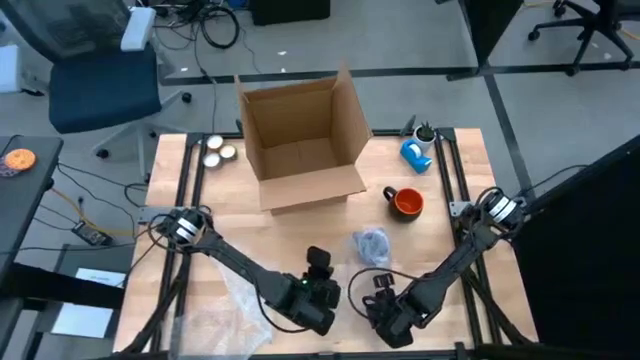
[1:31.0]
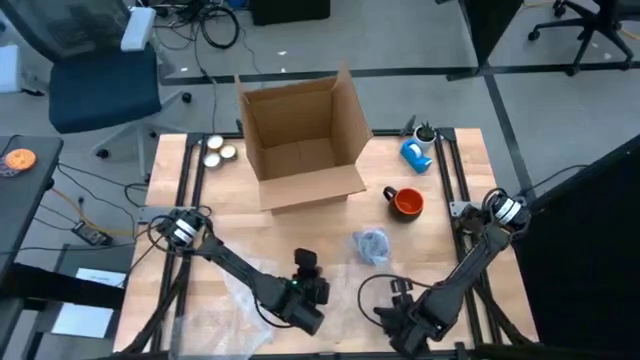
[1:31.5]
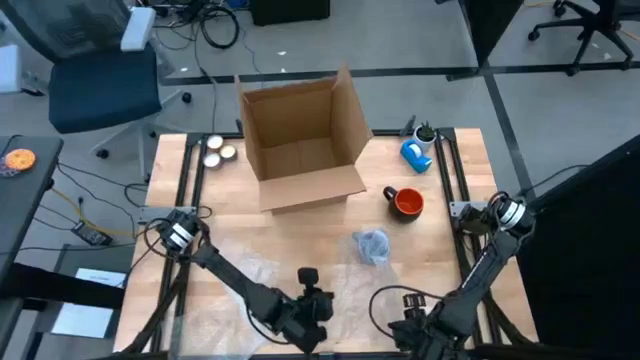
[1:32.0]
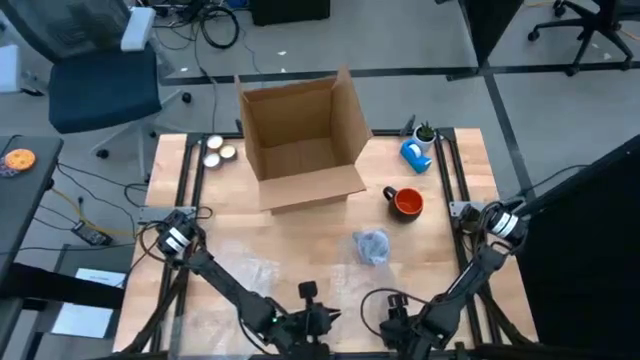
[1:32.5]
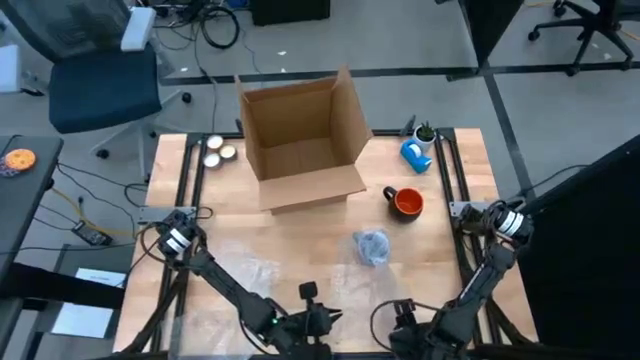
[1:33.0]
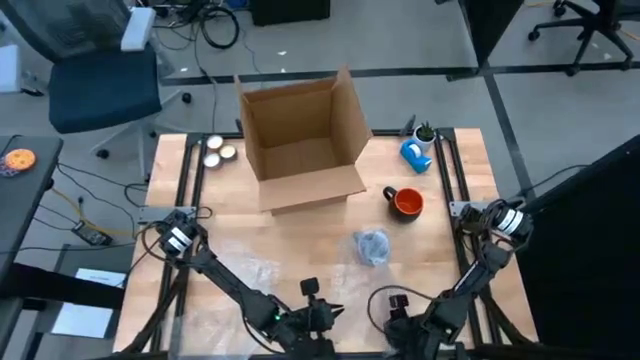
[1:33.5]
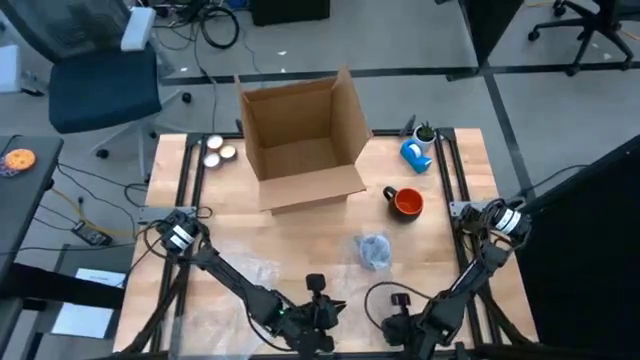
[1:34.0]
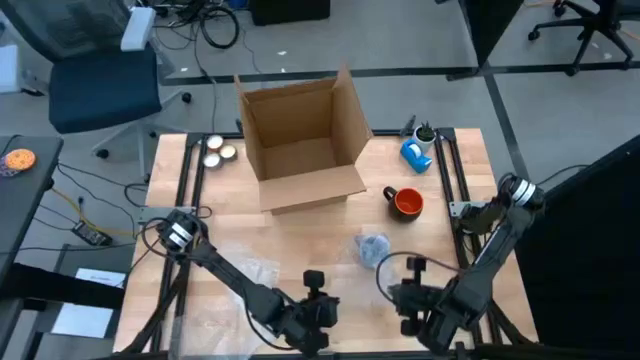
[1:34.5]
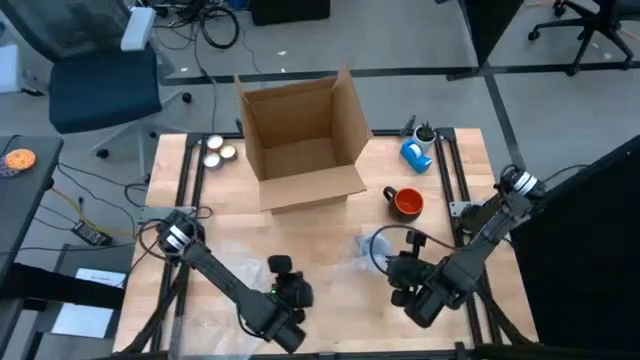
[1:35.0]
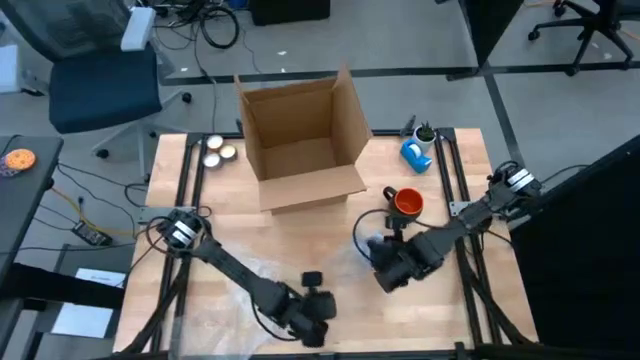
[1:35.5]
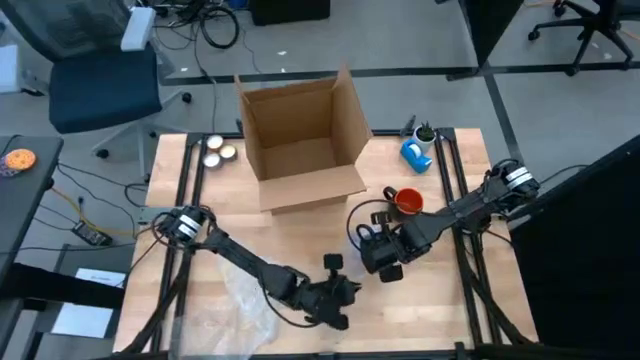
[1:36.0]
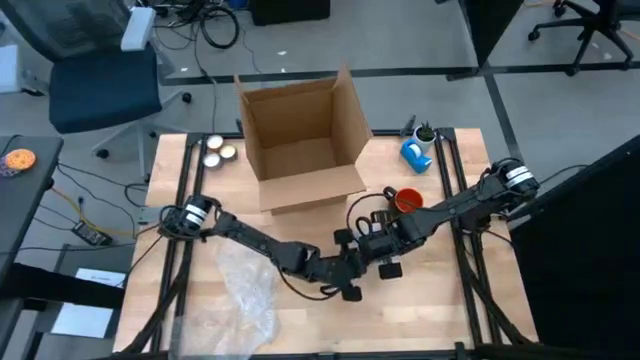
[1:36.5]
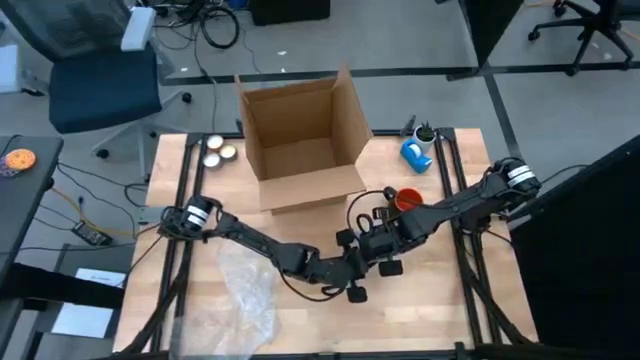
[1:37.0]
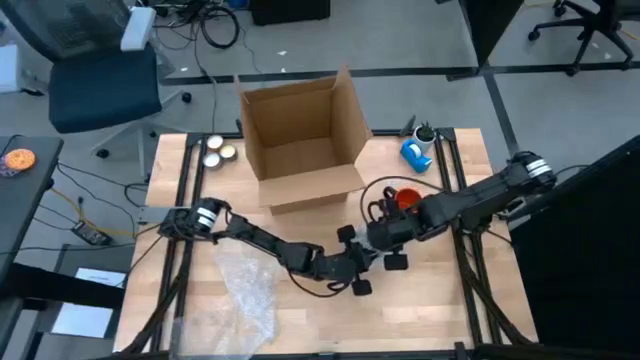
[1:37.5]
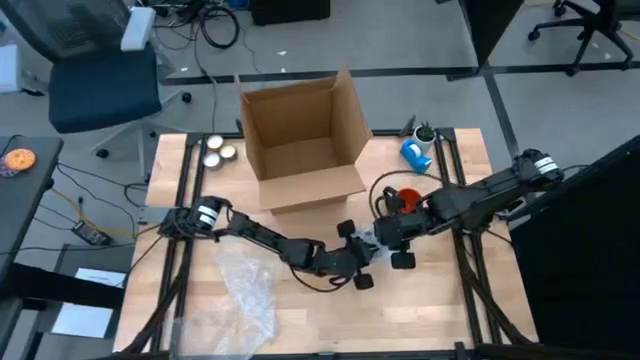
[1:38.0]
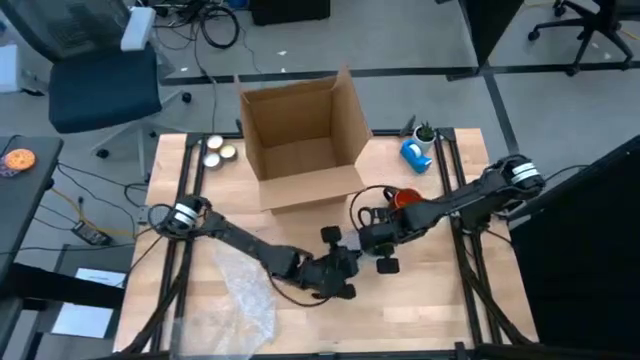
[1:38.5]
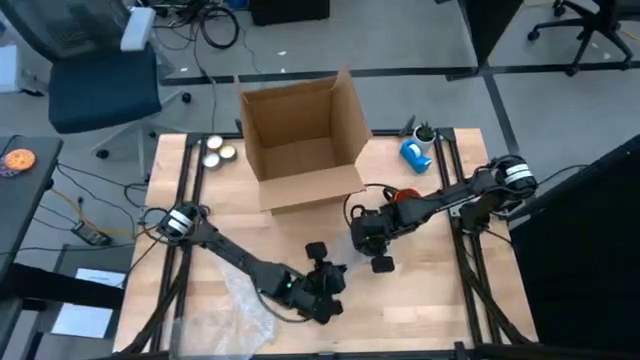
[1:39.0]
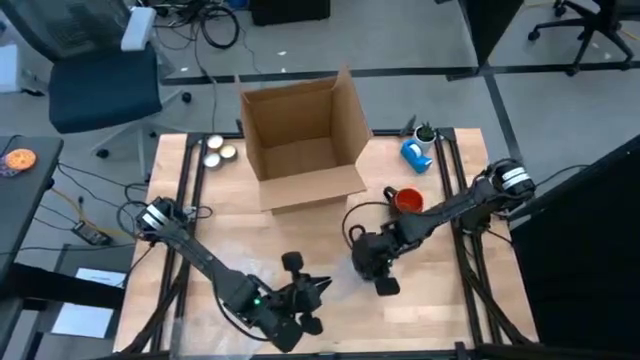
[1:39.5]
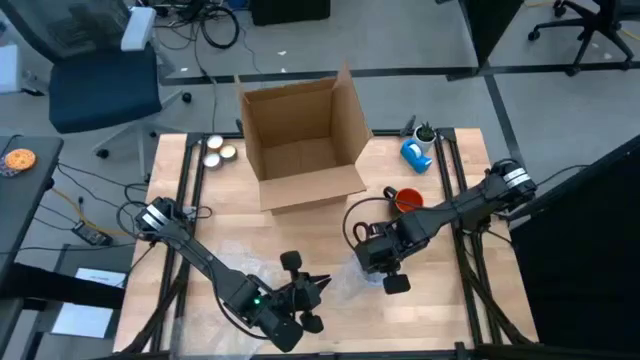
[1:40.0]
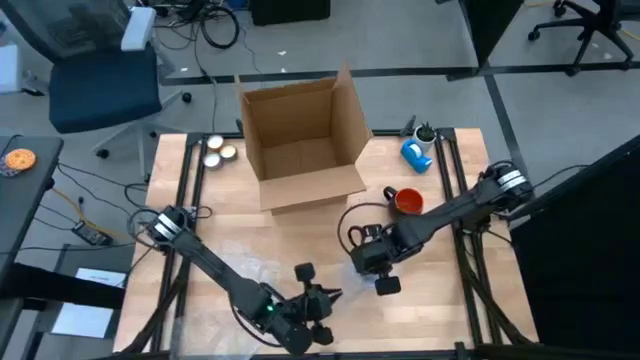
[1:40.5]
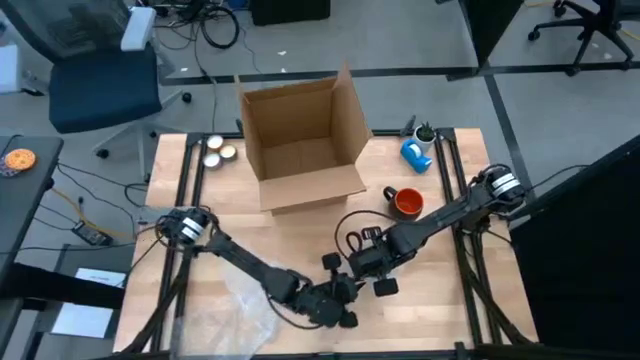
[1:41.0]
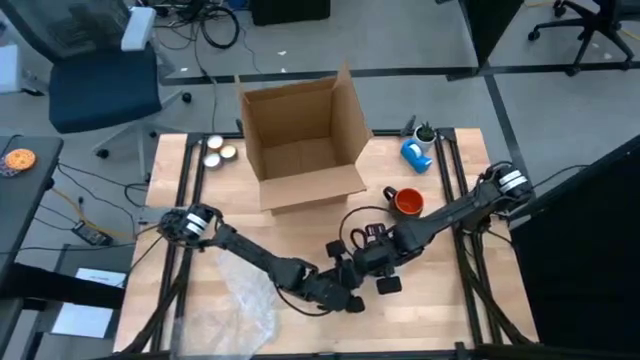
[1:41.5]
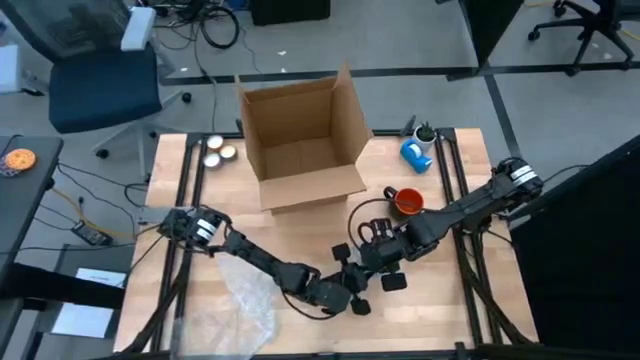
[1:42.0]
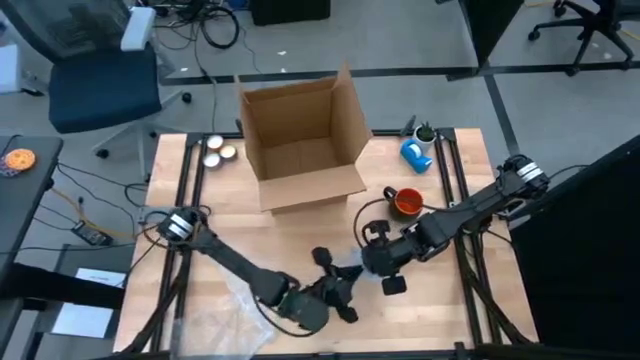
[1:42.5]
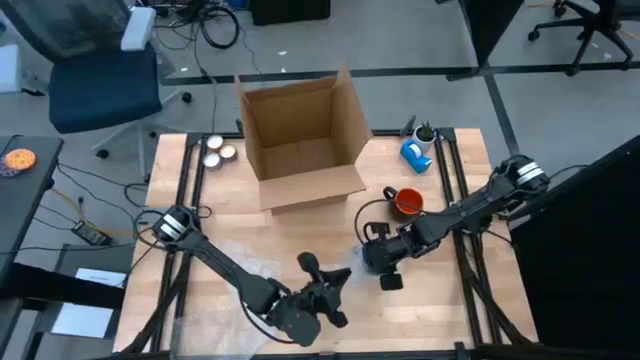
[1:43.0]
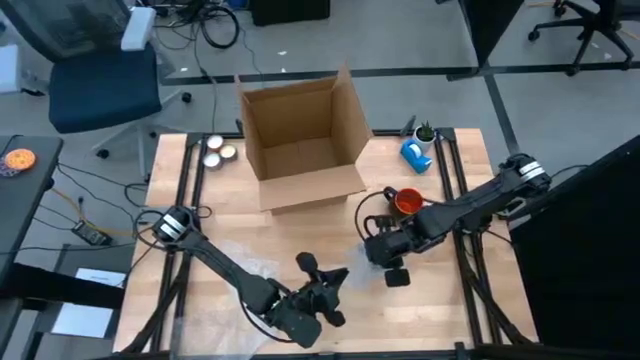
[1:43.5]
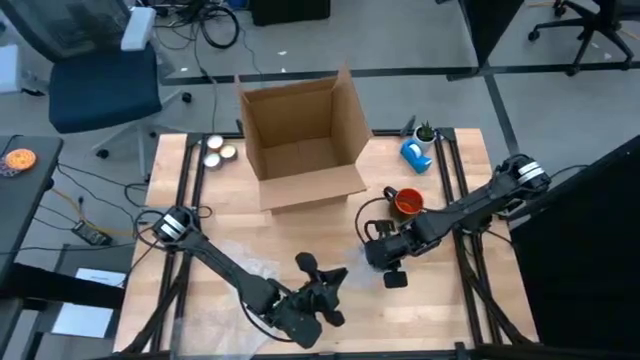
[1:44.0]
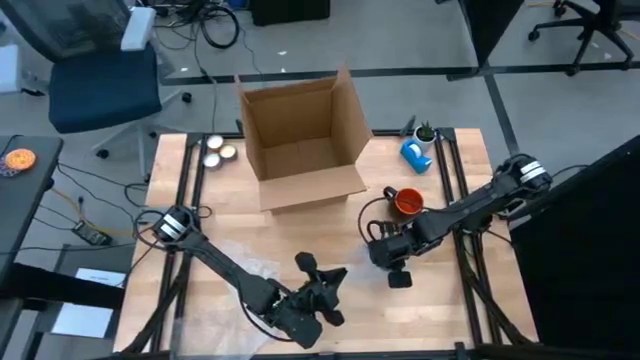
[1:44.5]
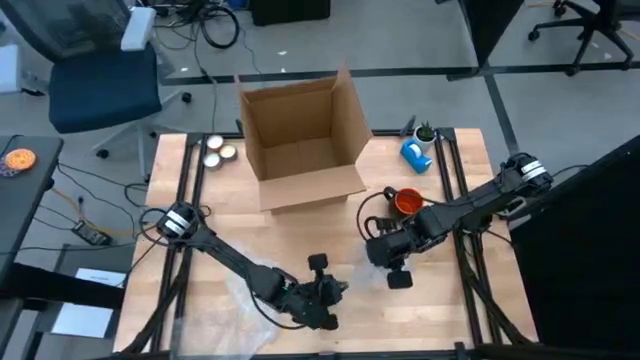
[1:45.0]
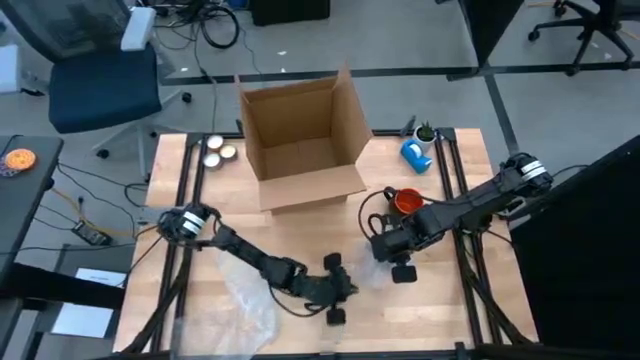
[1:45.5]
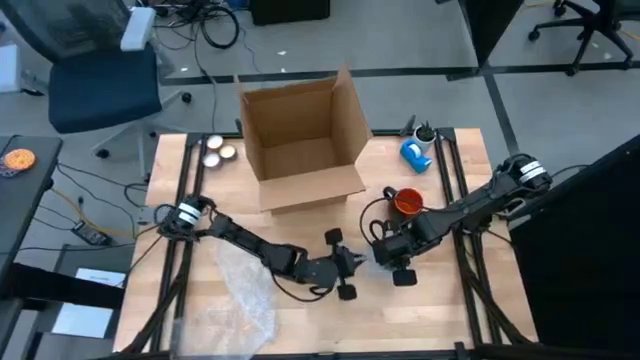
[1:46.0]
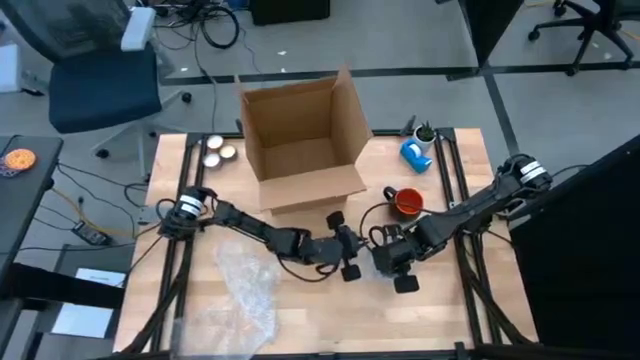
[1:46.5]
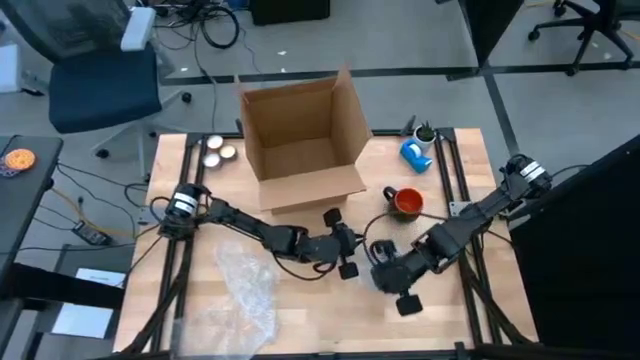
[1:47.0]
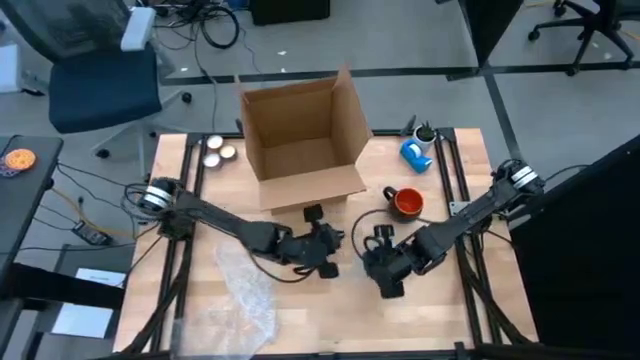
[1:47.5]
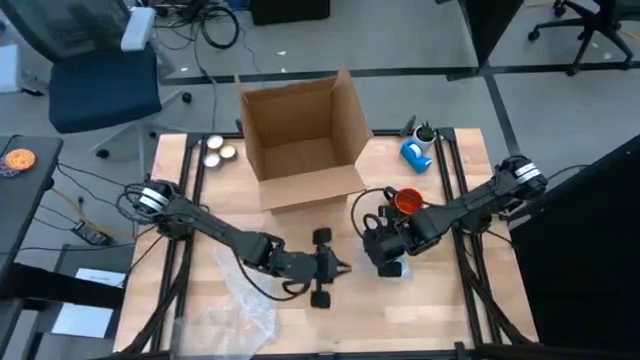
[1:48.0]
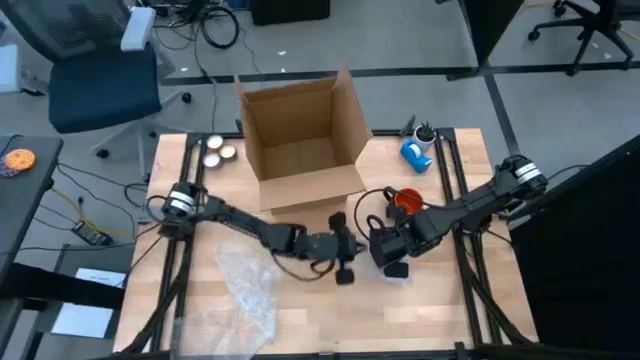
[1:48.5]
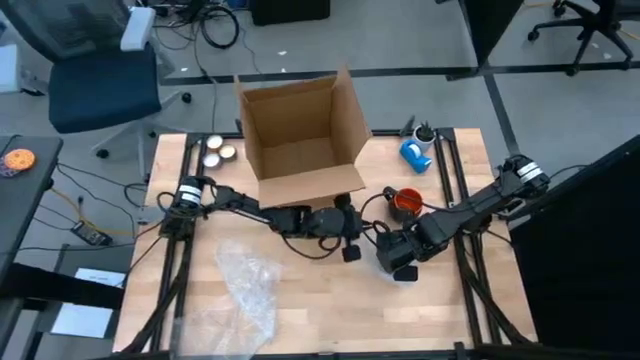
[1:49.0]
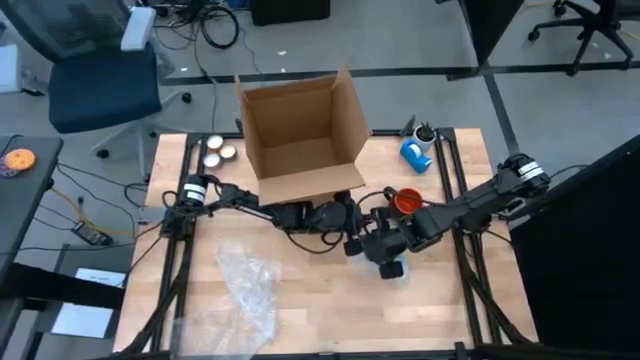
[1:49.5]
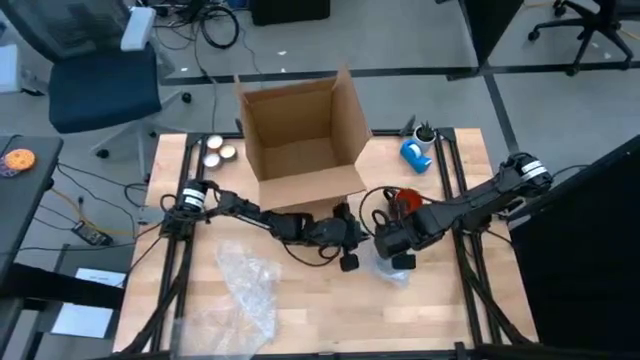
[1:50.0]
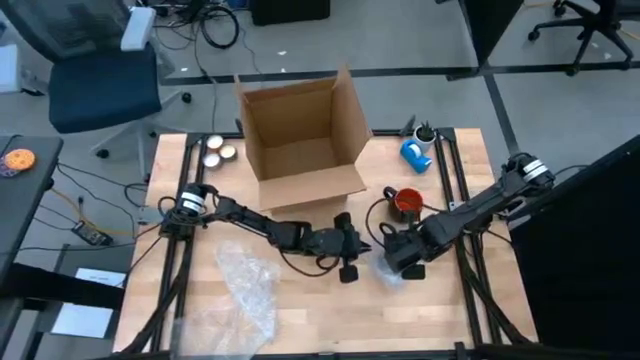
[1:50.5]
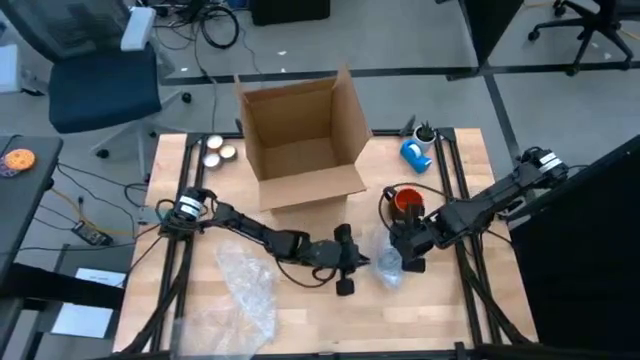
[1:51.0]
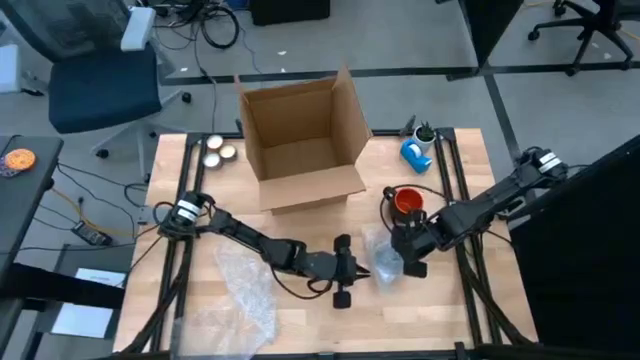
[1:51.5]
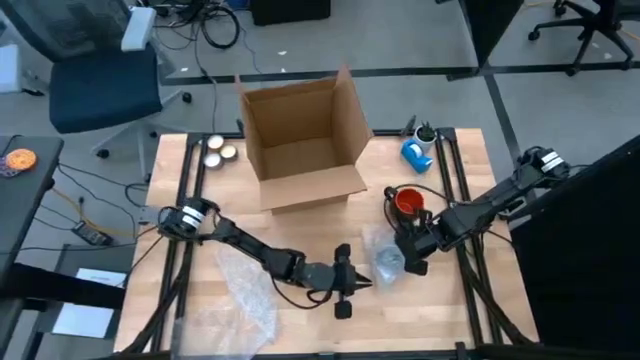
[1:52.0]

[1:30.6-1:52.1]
Task: wrap mug
Wrap the blue mug with the top bubble wrap
